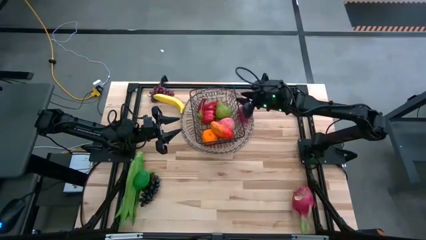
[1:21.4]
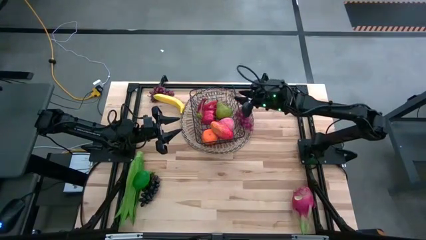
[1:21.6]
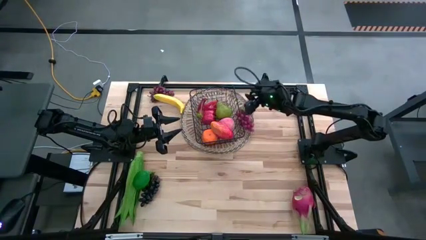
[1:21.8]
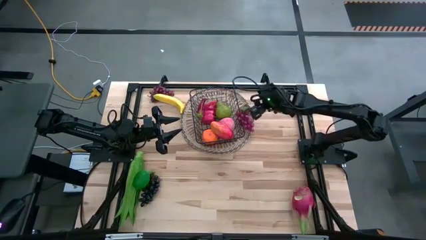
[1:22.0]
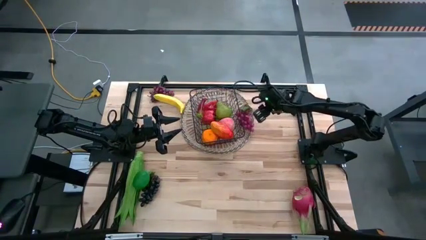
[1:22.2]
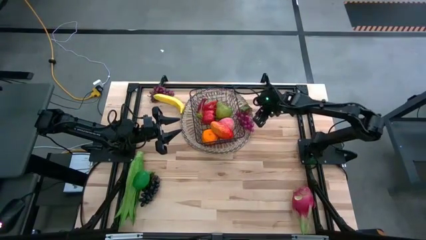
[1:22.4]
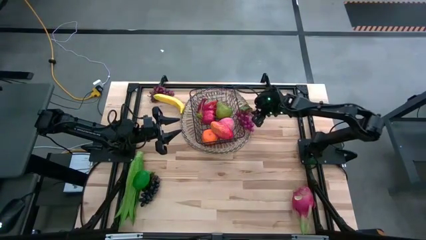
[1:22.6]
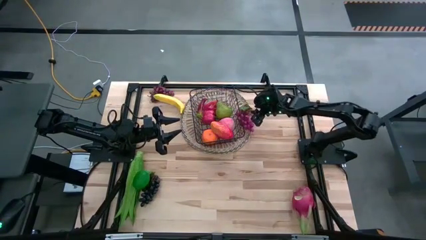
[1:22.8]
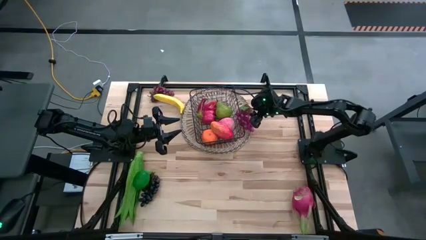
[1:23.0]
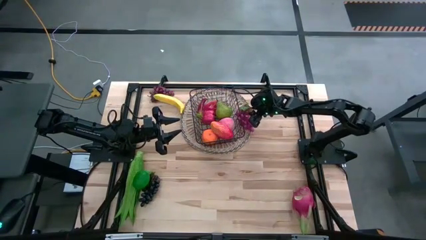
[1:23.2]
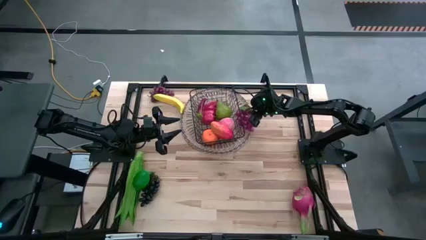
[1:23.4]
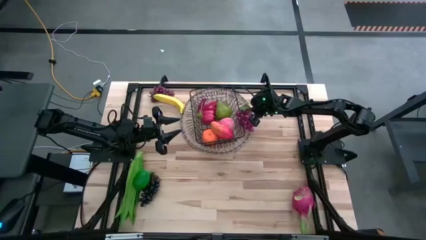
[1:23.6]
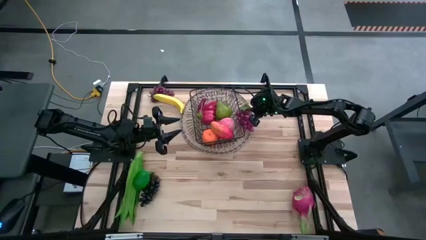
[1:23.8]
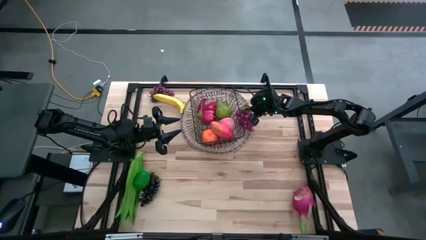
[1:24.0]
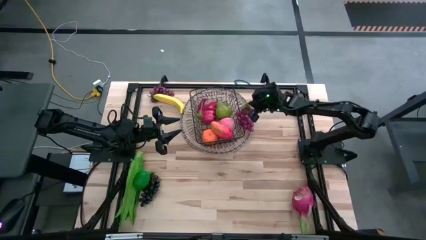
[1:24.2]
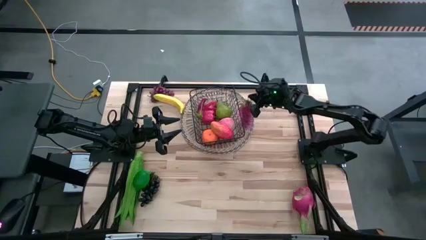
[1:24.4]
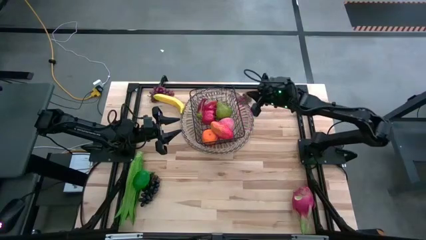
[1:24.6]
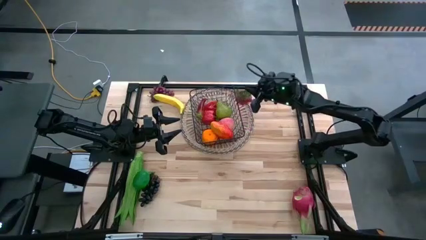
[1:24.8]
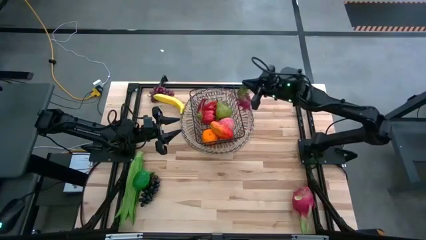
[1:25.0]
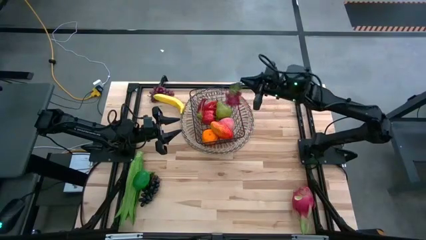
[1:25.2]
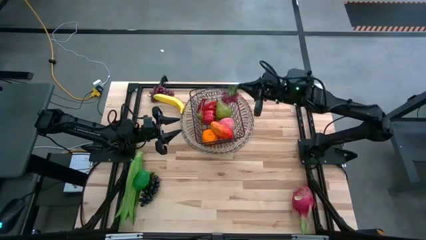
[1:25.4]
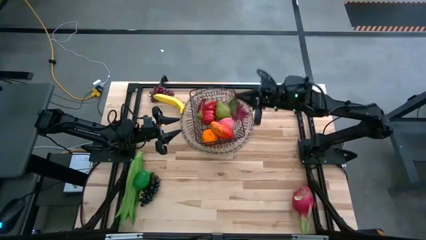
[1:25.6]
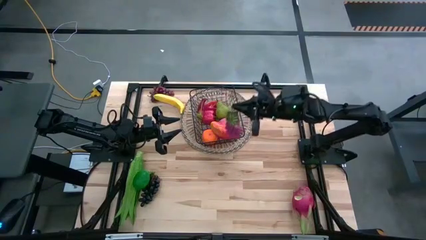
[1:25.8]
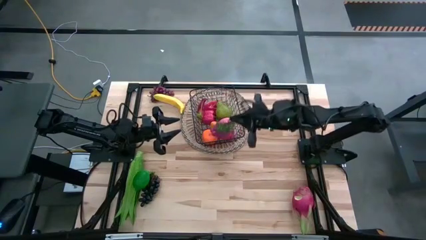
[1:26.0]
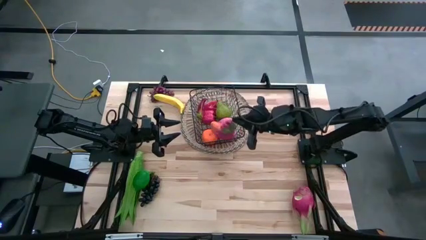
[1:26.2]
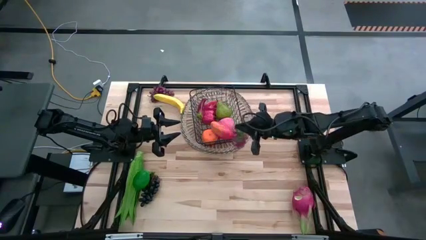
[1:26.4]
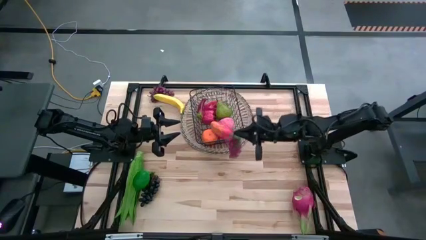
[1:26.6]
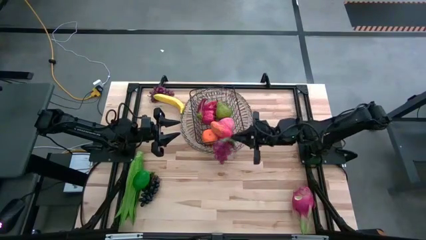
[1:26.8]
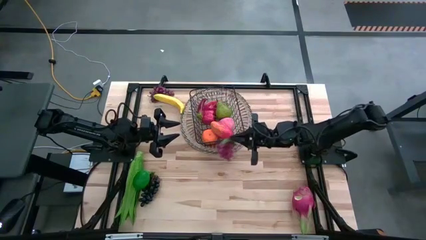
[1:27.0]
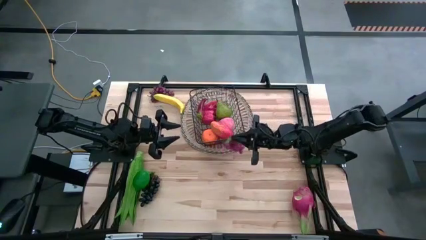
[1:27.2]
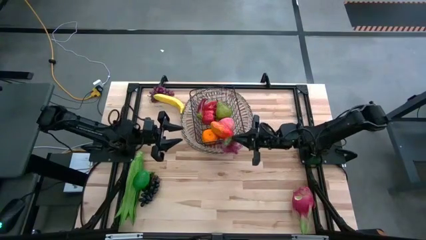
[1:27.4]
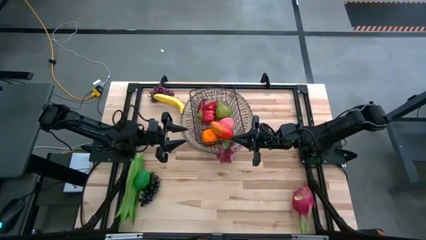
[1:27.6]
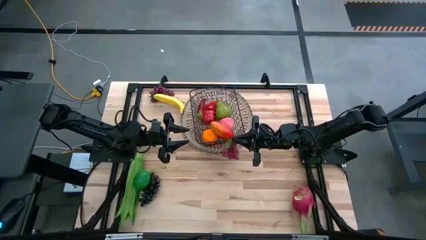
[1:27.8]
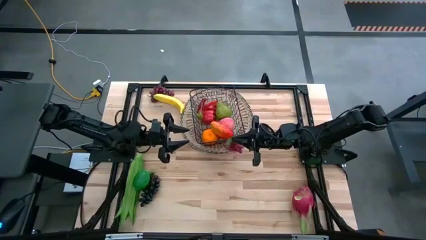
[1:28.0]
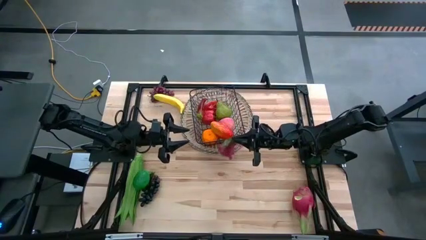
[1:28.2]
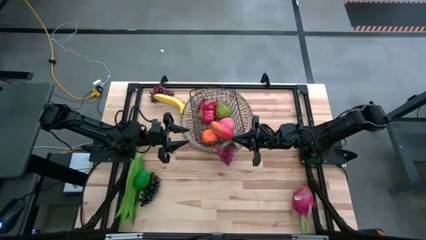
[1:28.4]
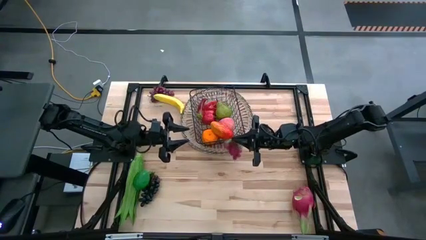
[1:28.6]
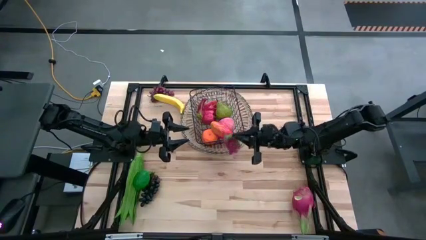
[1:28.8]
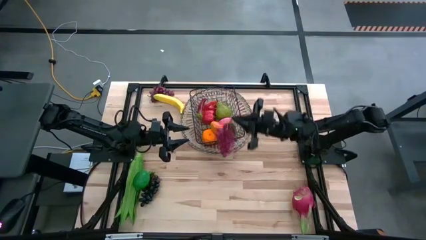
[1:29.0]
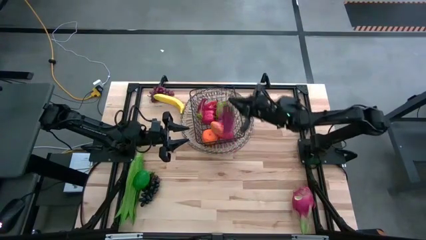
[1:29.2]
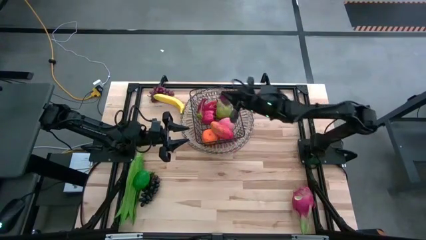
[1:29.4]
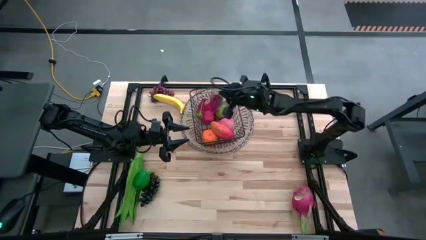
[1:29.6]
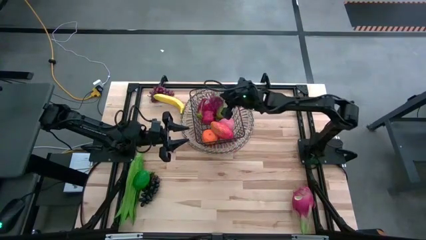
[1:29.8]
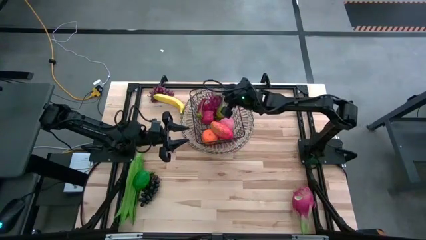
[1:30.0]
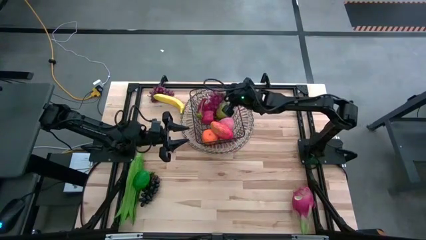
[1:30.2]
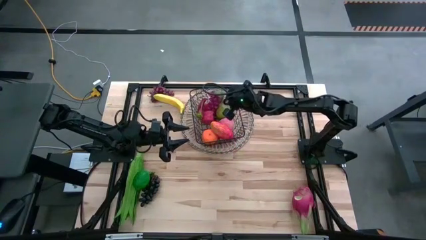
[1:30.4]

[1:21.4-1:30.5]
Task: Build produce basket
Put the top right purple grapes into the black wire basket

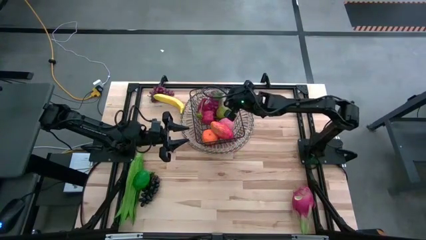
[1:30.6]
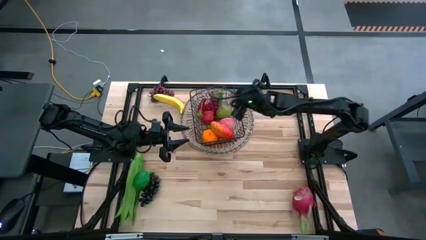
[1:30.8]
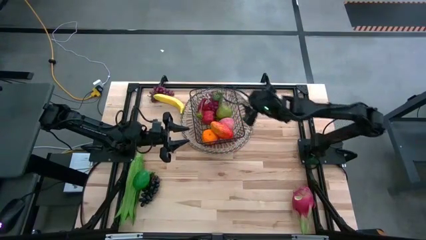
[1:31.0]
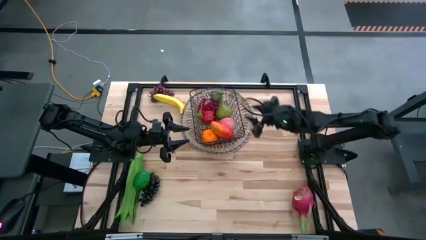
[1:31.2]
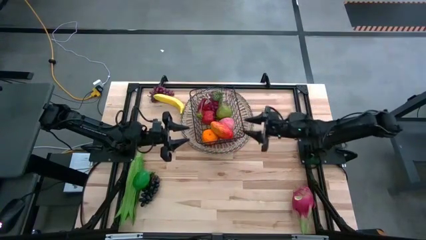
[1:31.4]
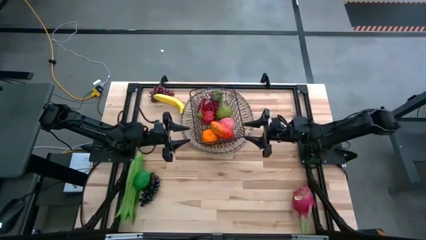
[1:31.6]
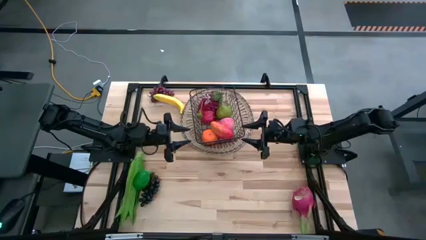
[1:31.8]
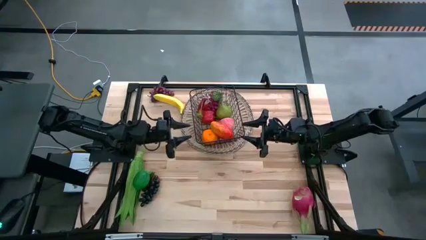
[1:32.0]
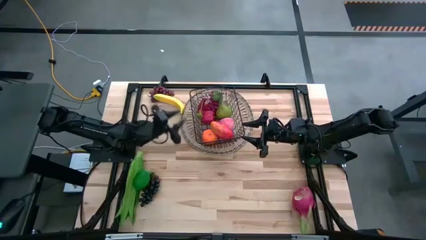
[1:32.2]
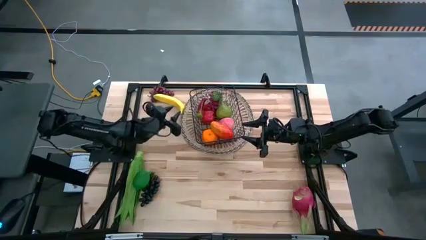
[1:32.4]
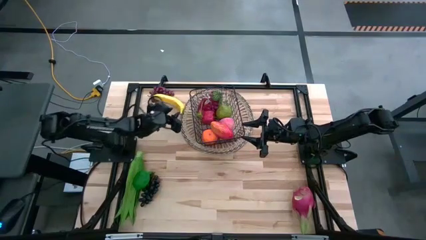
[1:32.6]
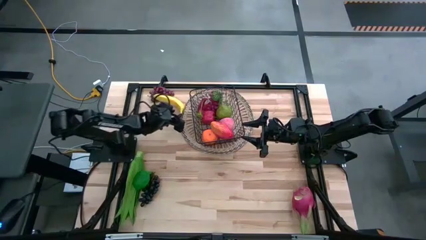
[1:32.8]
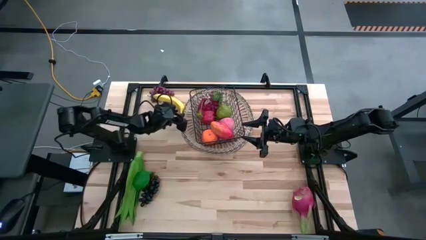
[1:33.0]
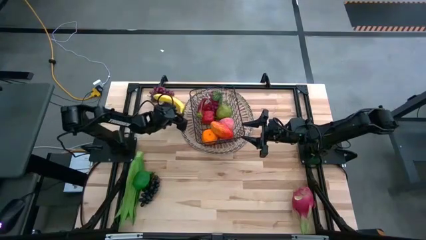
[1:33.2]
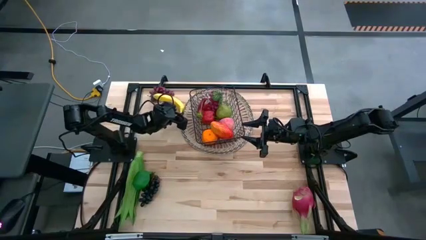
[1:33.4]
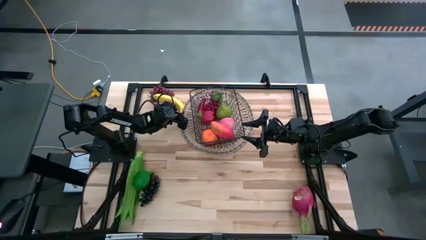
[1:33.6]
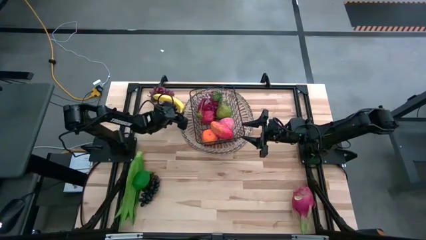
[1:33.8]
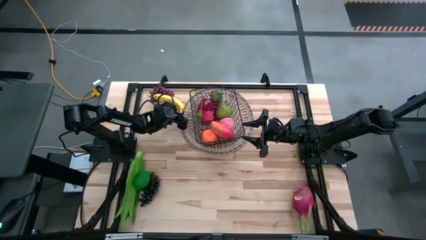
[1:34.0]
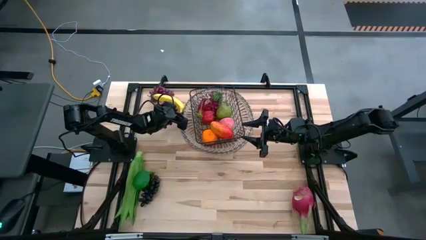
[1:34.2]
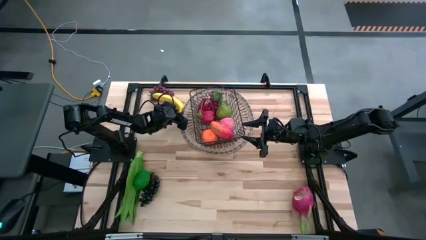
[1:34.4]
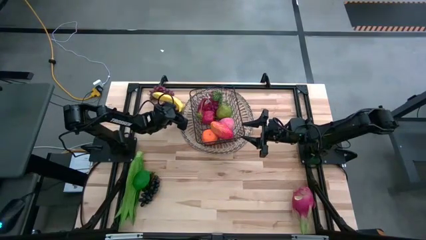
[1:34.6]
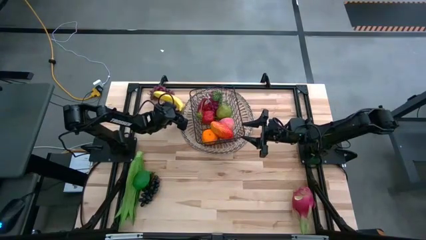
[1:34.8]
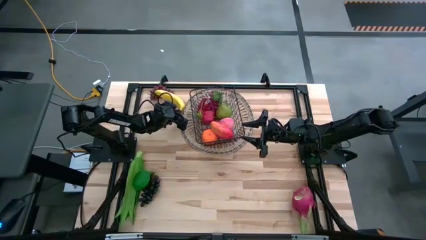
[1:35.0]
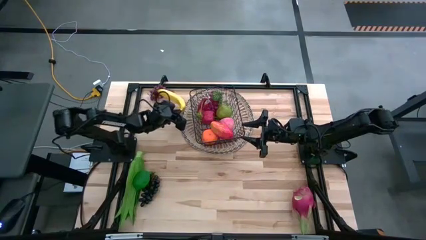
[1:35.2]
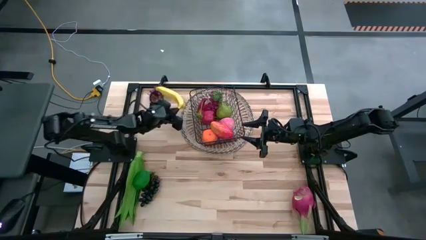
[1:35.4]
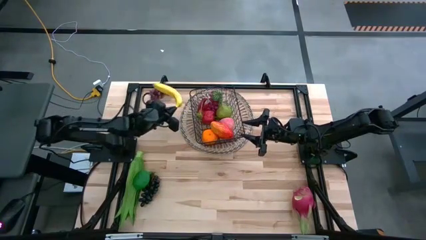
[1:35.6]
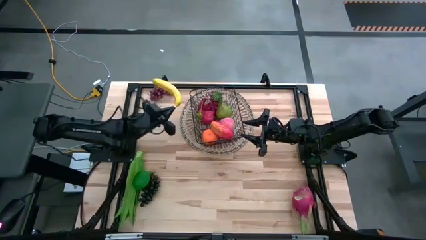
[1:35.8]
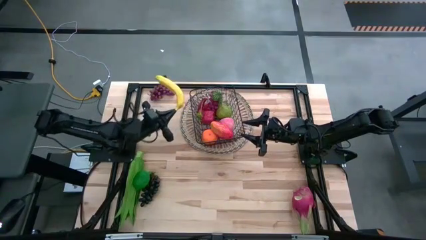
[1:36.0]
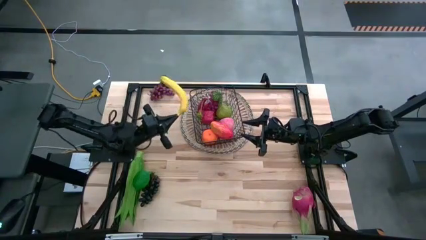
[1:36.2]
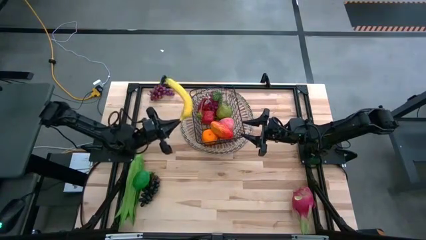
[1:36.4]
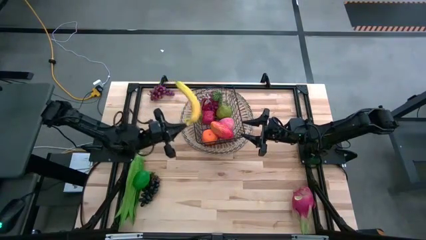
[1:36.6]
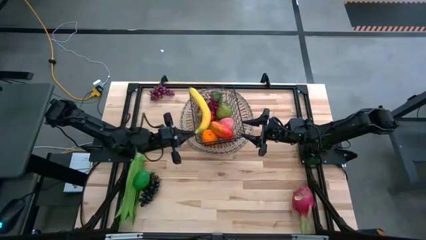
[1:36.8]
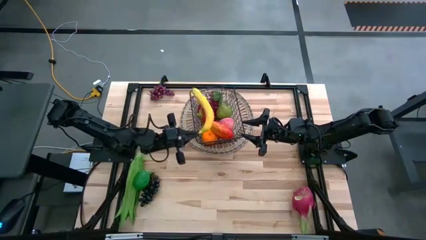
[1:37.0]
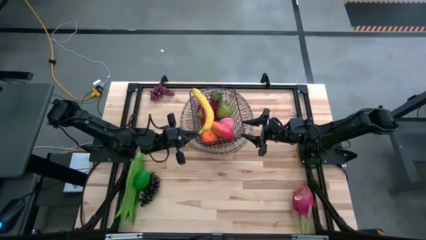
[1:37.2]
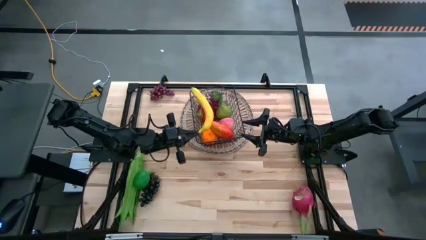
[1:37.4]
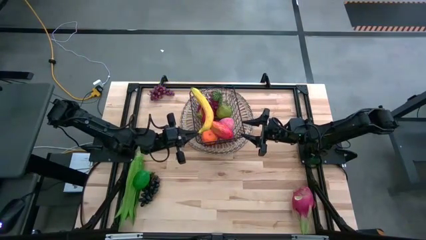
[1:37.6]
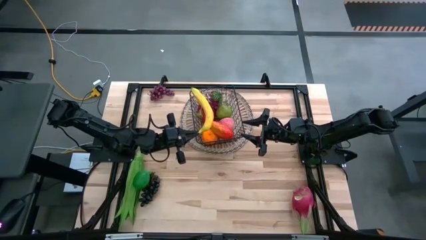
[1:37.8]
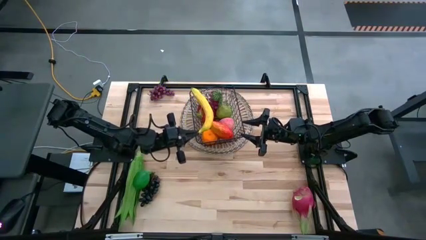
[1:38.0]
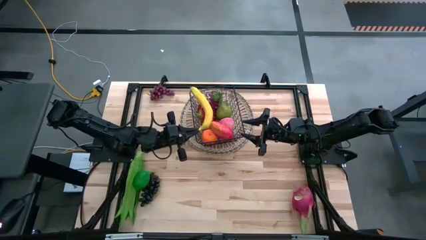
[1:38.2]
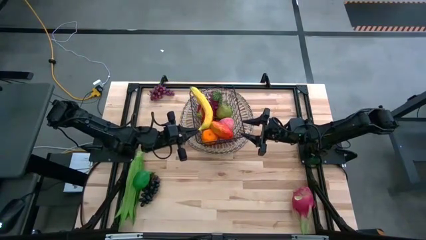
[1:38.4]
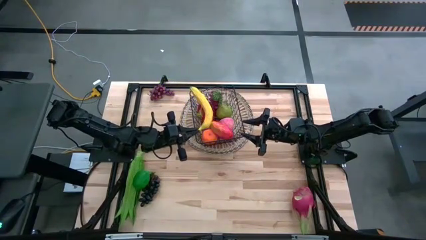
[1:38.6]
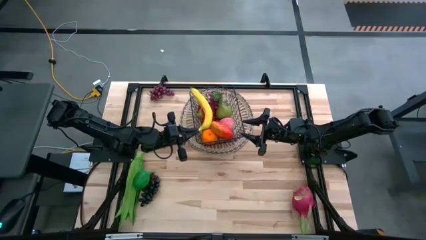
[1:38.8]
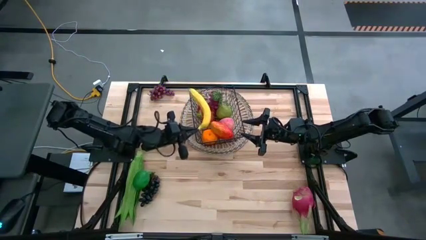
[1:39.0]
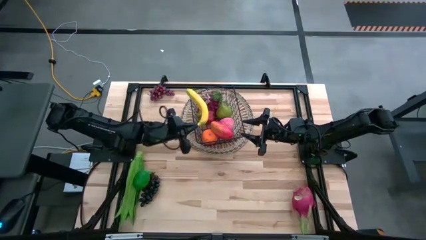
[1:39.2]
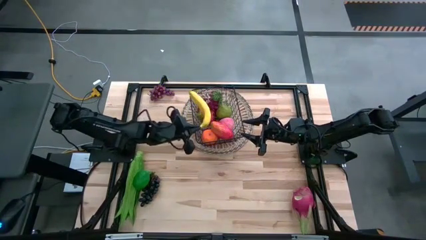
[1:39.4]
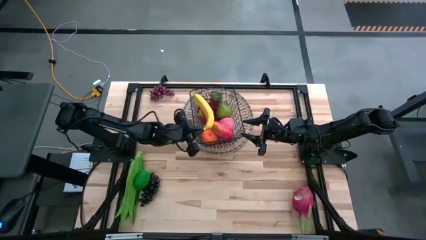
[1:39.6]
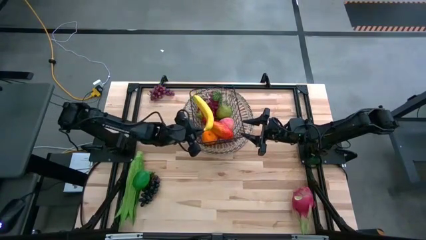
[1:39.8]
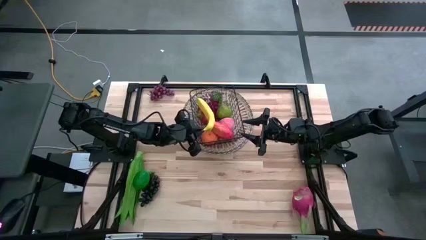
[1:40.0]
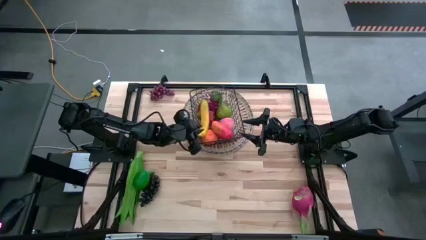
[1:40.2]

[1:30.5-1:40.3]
Put the yellow banana into the black wire basket
